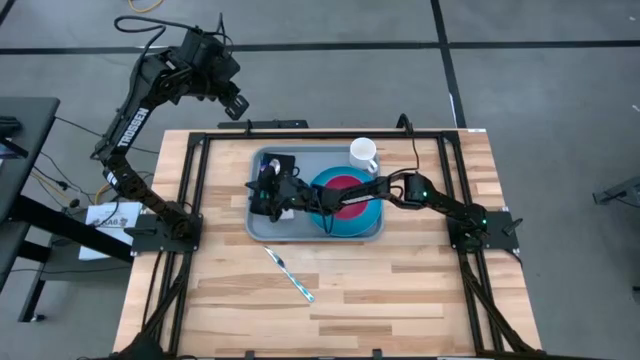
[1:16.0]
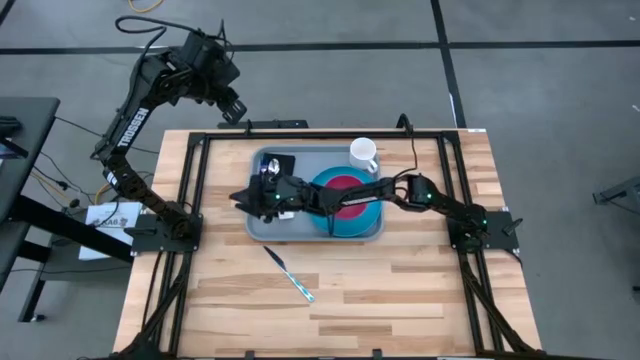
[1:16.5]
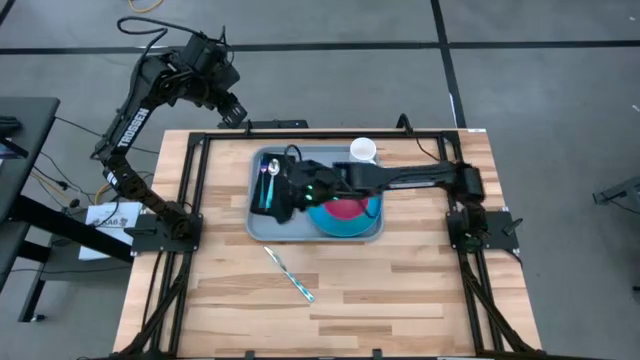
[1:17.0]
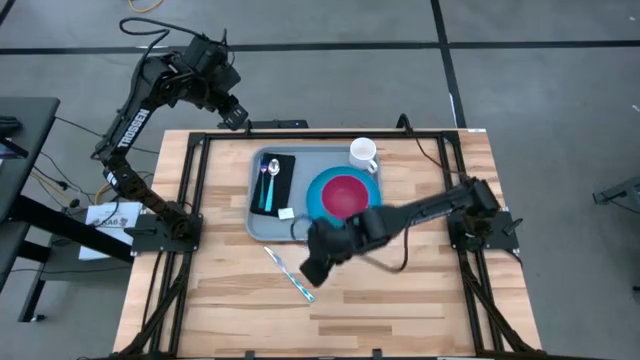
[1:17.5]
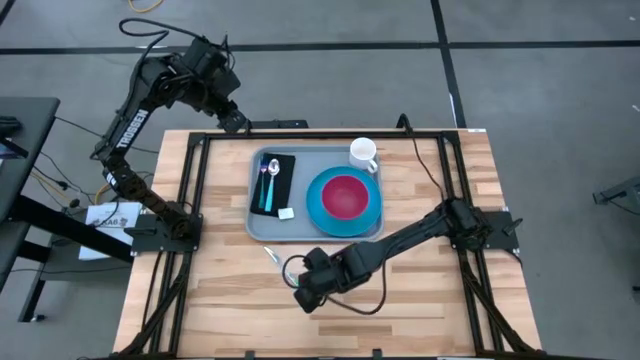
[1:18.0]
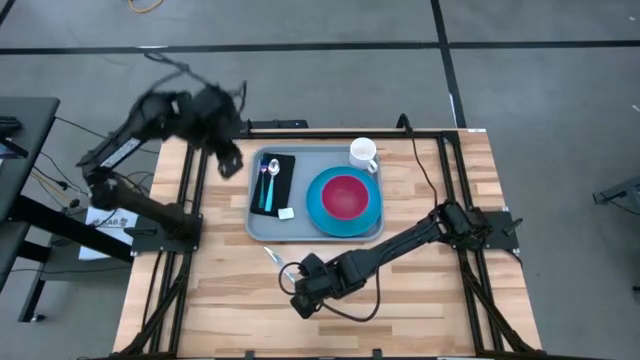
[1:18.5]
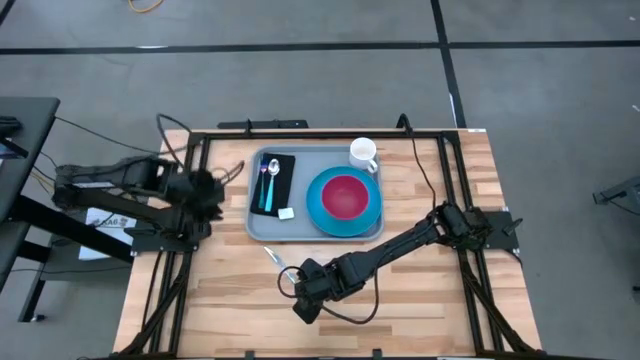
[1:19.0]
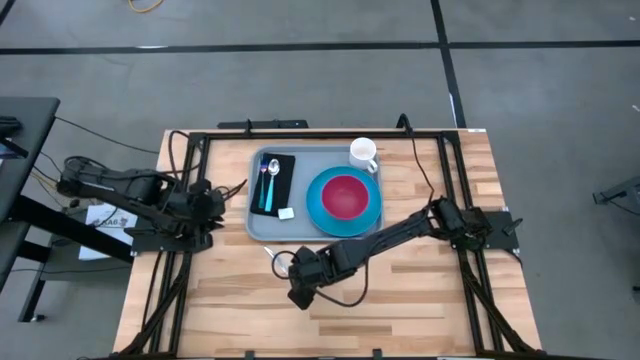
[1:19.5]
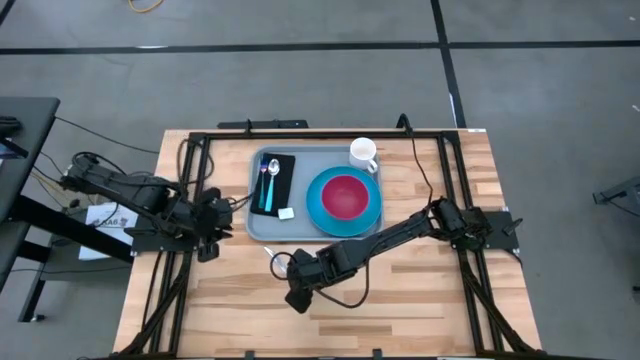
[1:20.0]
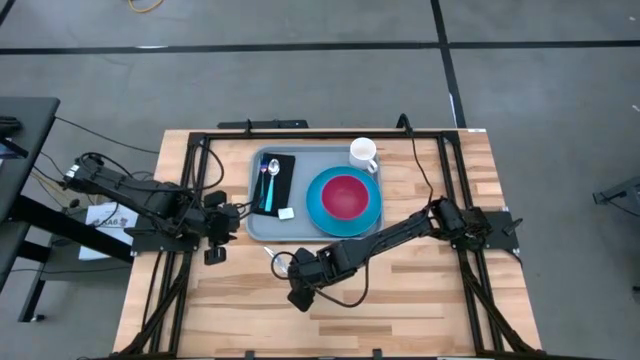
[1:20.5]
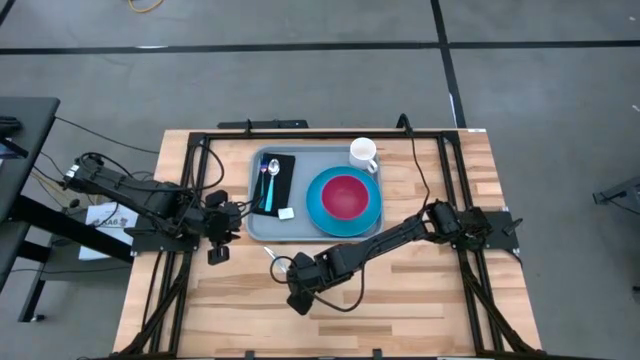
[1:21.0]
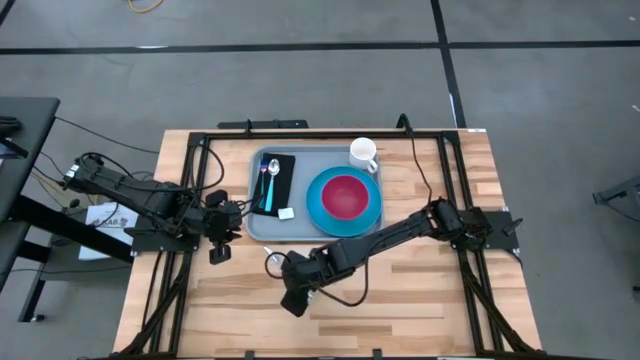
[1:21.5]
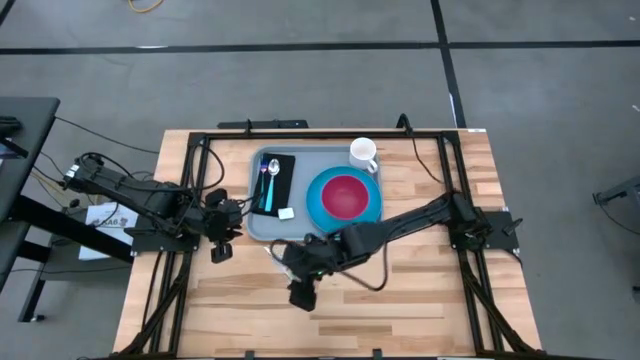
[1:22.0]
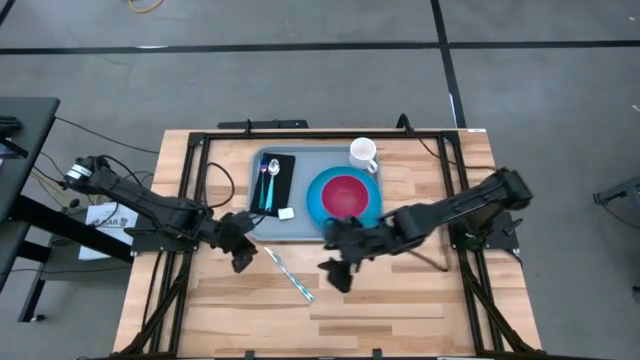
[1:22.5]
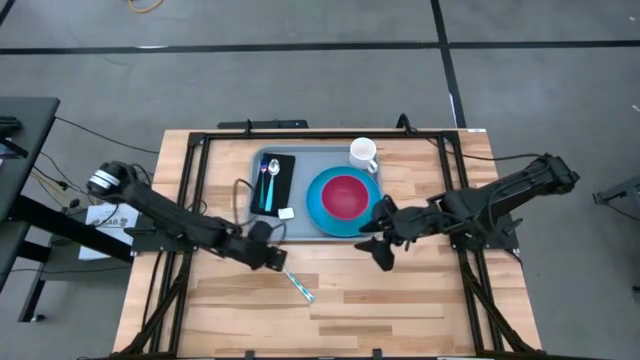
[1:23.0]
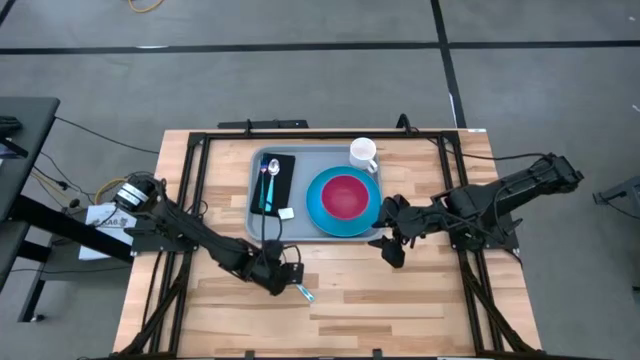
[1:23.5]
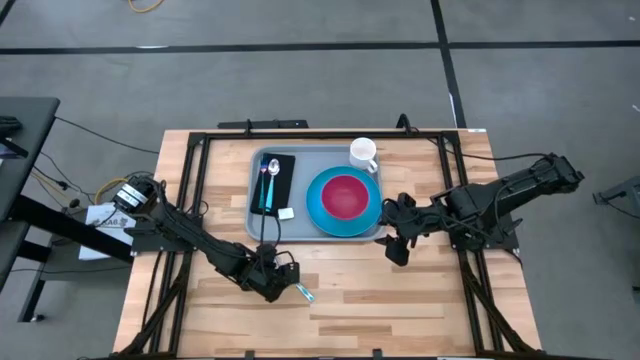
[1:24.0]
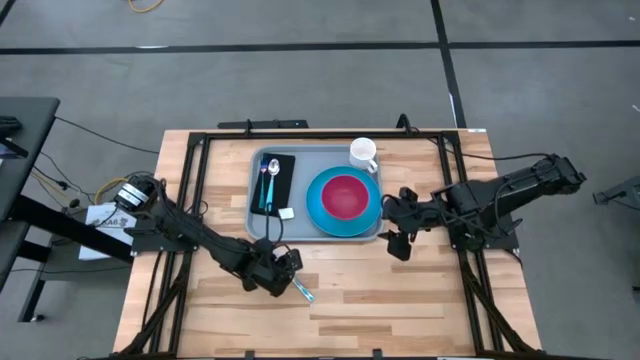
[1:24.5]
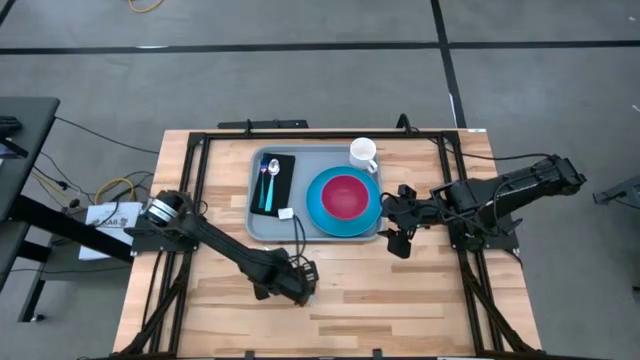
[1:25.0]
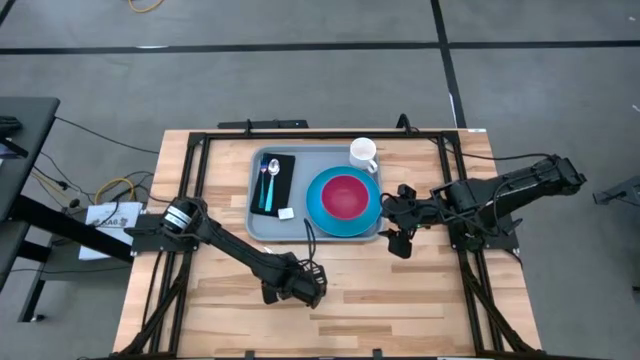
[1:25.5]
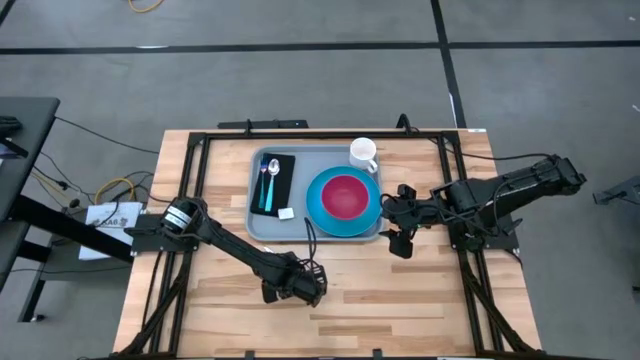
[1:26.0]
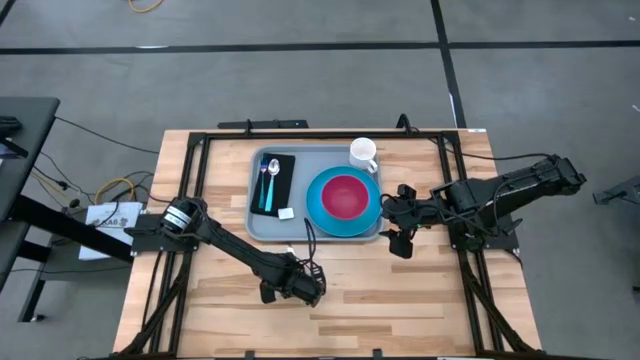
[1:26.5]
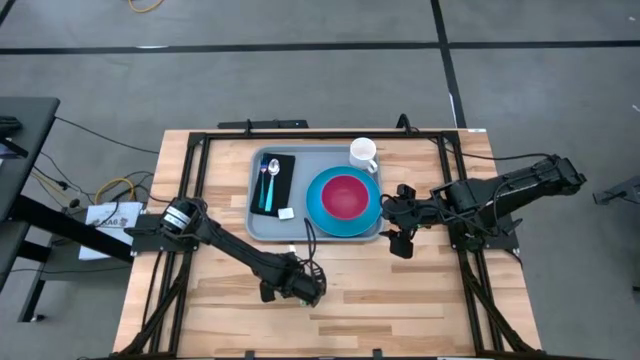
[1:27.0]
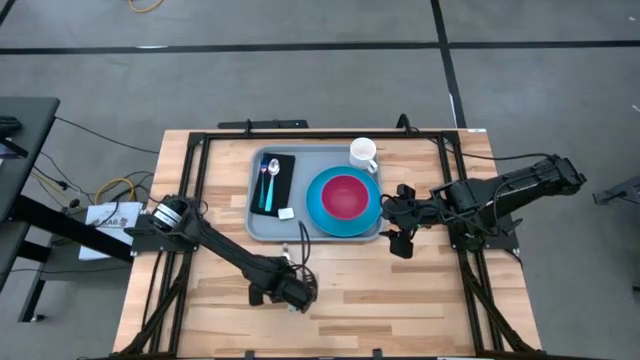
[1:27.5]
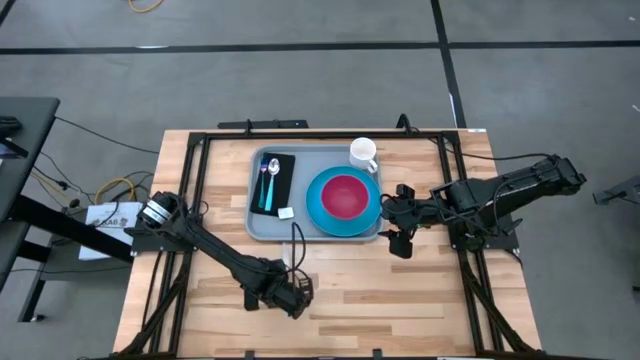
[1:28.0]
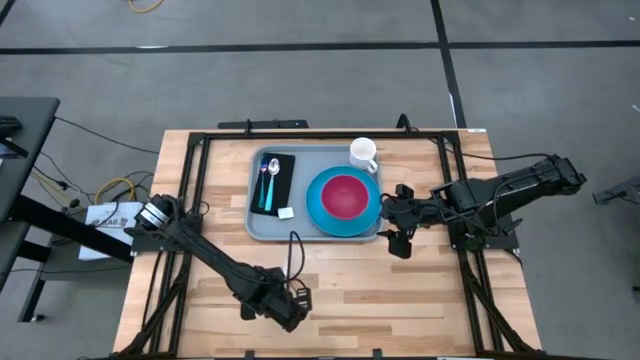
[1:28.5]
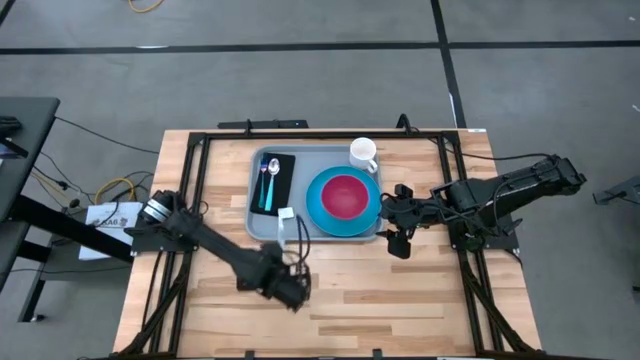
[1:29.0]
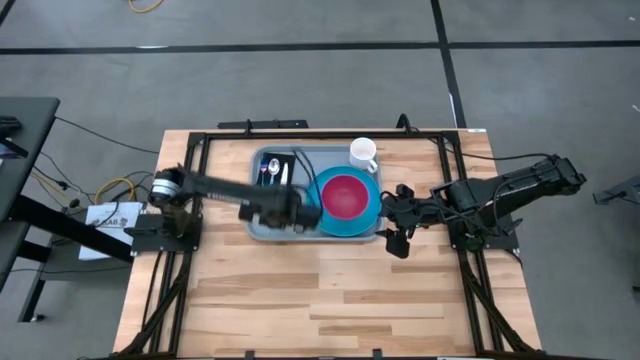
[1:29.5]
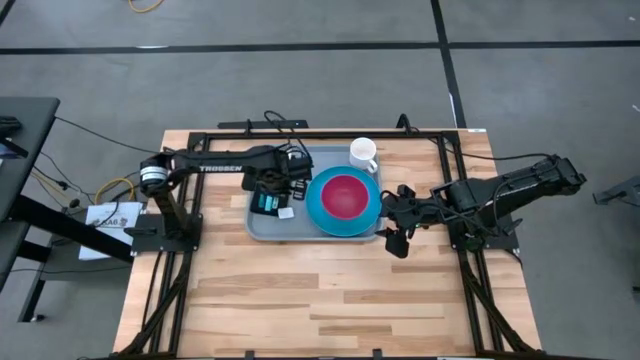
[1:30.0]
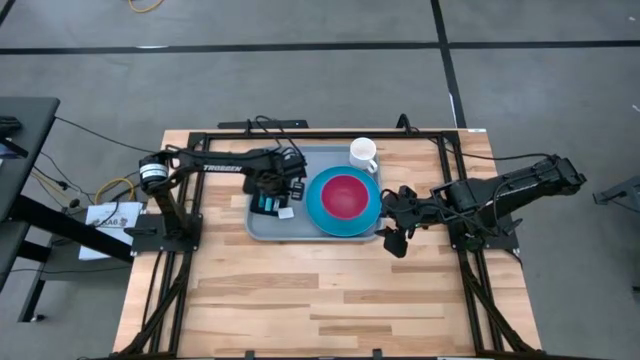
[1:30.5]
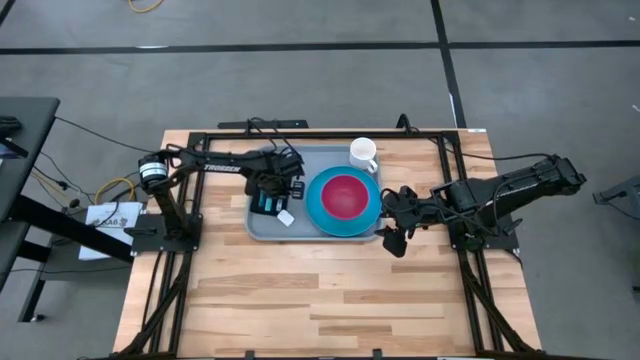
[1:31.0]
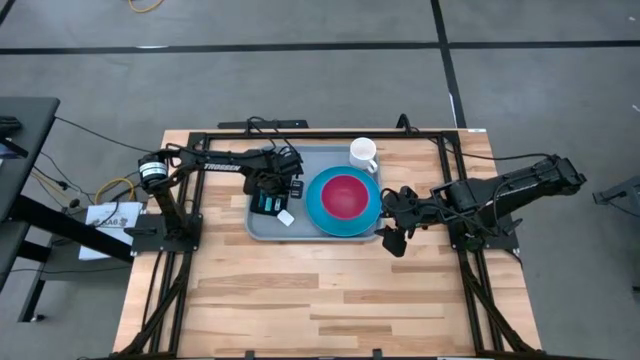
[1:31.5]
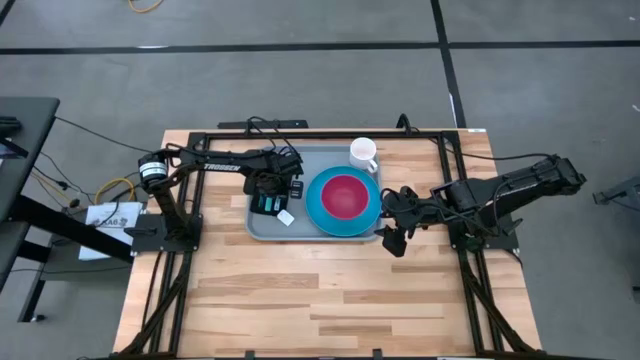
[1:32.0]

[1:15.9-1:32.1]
Task: Set up tray
Put the blue knife to the right of the blue spoon on the black napkin on the gray serving tray
